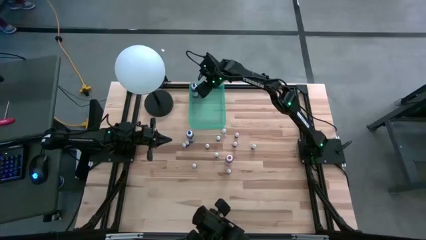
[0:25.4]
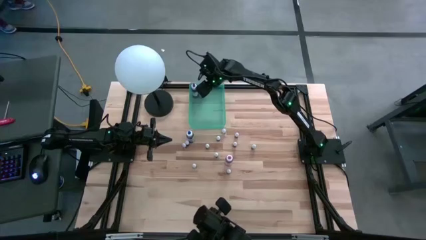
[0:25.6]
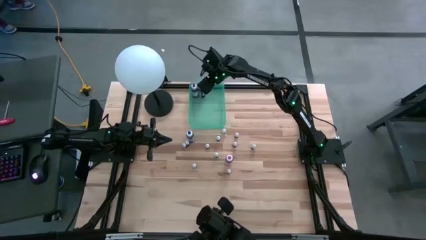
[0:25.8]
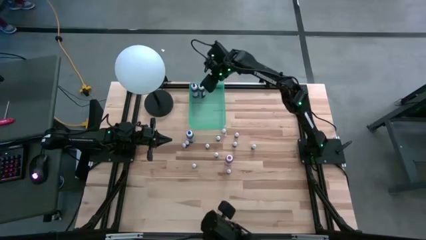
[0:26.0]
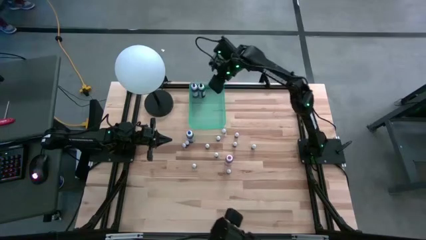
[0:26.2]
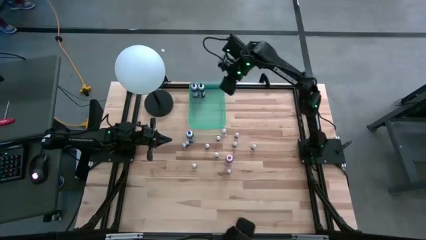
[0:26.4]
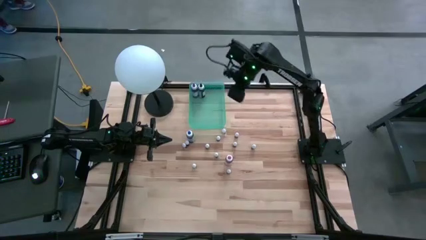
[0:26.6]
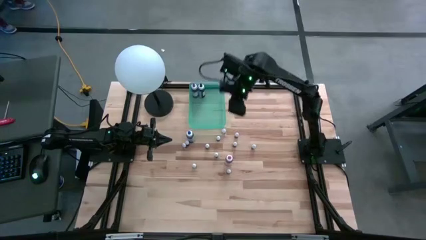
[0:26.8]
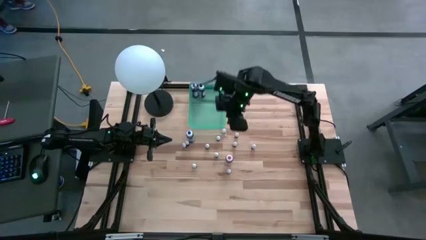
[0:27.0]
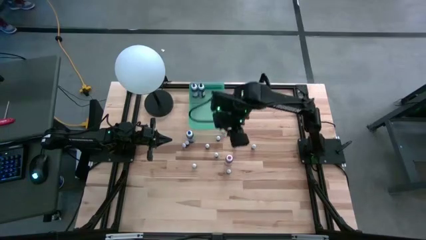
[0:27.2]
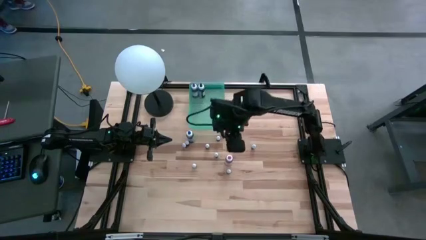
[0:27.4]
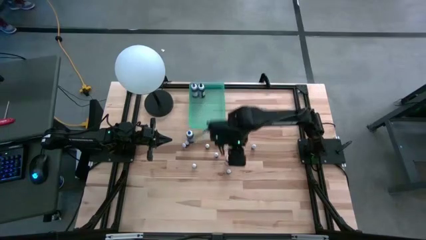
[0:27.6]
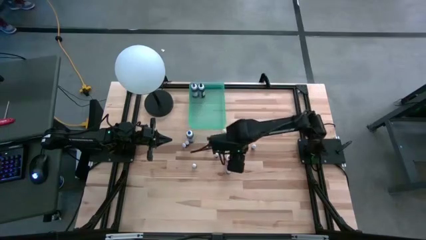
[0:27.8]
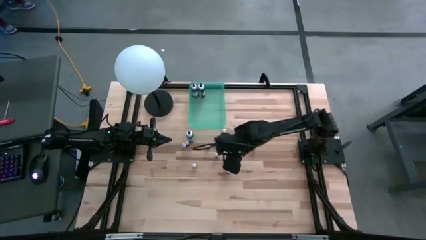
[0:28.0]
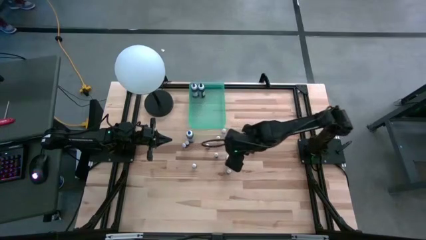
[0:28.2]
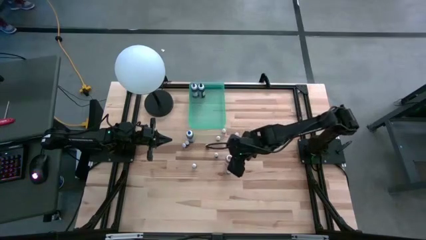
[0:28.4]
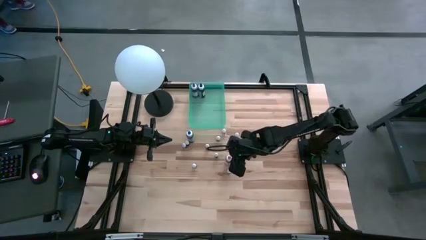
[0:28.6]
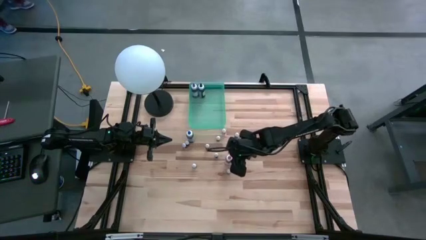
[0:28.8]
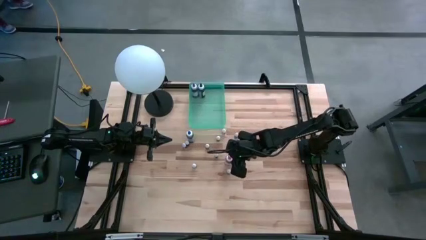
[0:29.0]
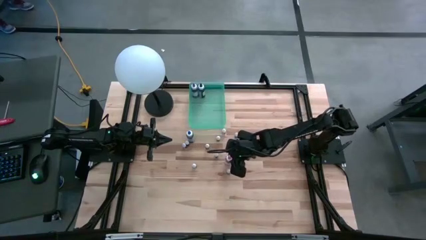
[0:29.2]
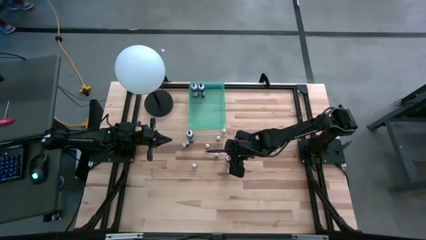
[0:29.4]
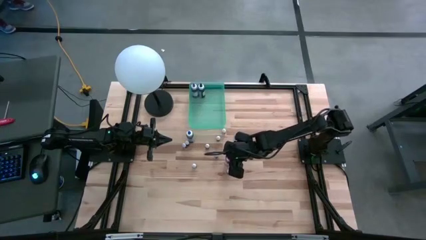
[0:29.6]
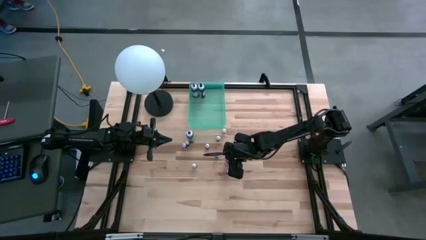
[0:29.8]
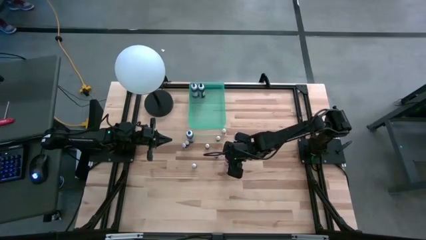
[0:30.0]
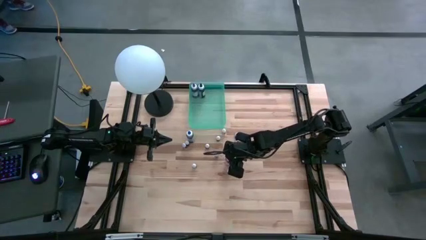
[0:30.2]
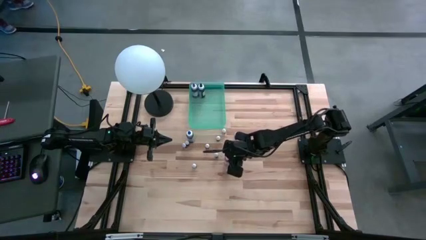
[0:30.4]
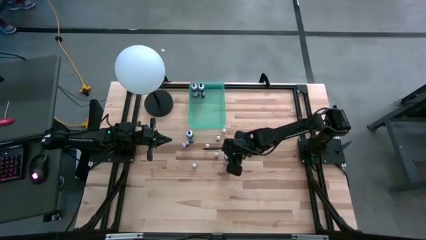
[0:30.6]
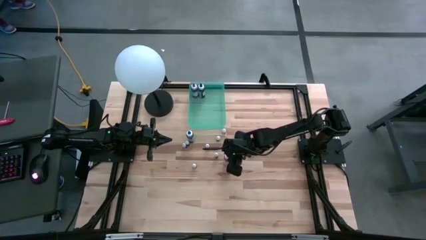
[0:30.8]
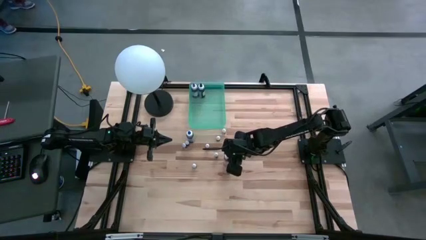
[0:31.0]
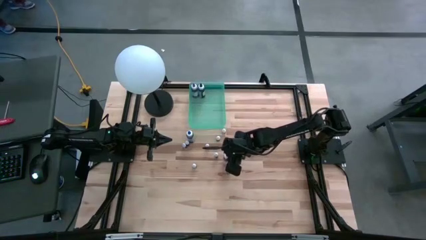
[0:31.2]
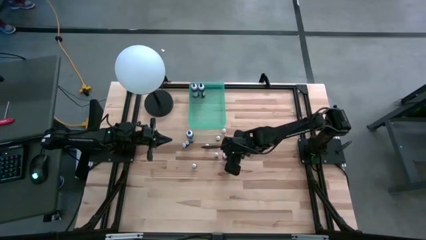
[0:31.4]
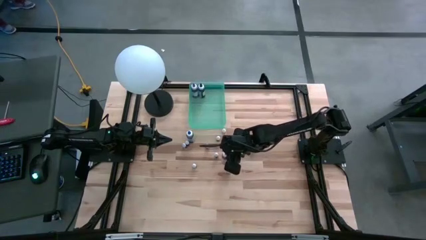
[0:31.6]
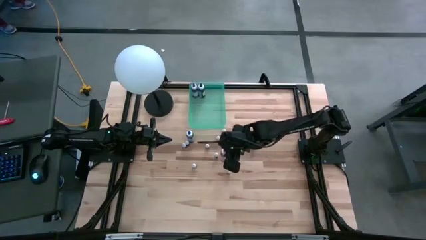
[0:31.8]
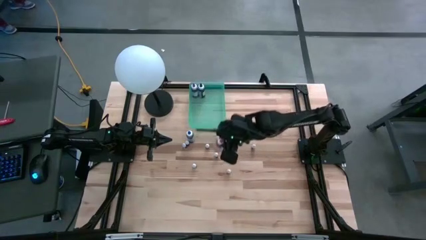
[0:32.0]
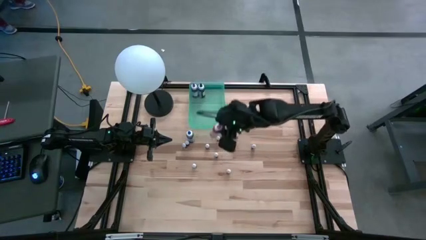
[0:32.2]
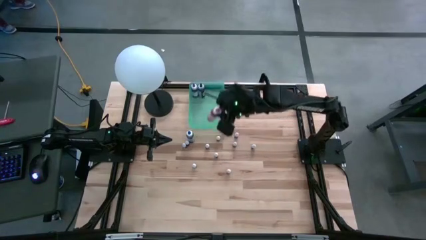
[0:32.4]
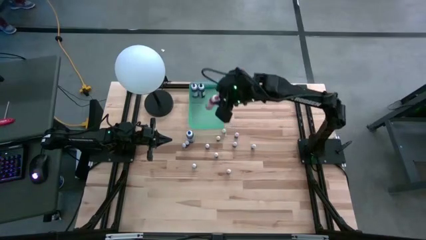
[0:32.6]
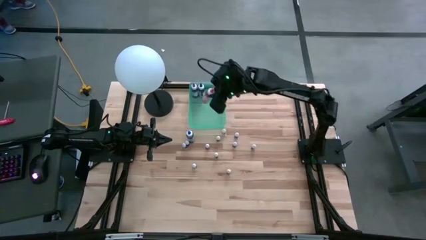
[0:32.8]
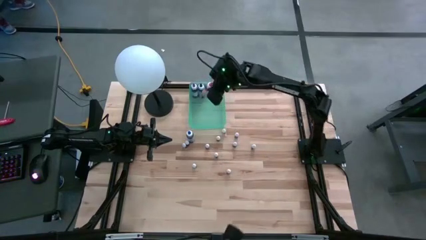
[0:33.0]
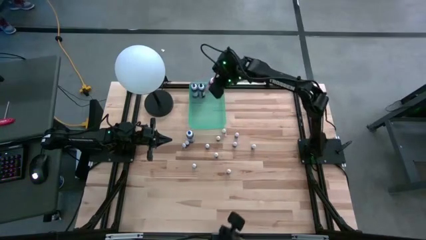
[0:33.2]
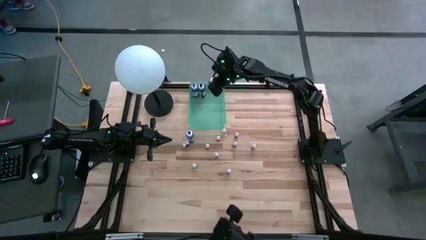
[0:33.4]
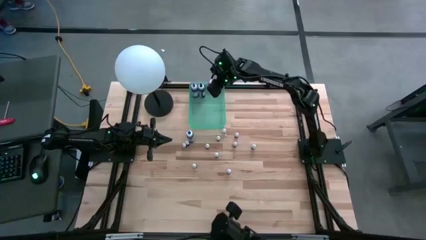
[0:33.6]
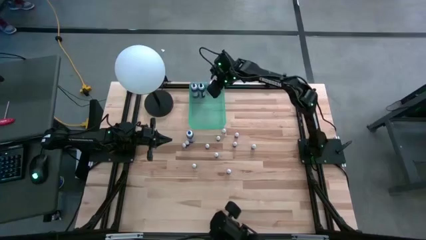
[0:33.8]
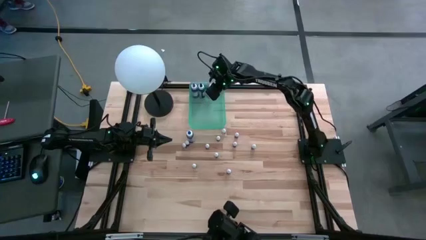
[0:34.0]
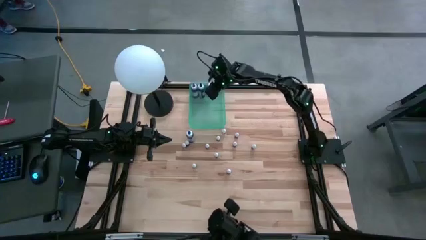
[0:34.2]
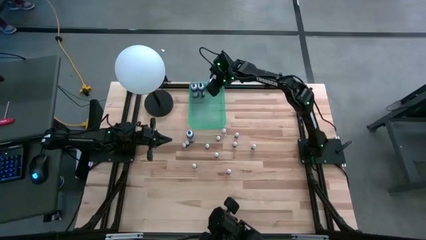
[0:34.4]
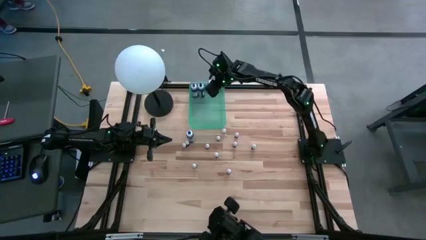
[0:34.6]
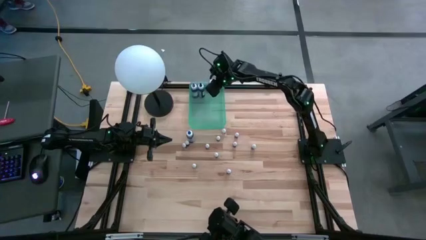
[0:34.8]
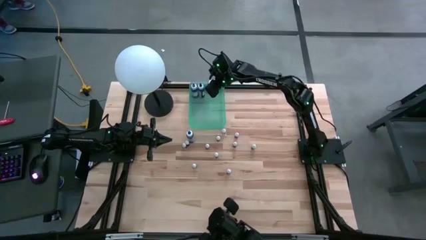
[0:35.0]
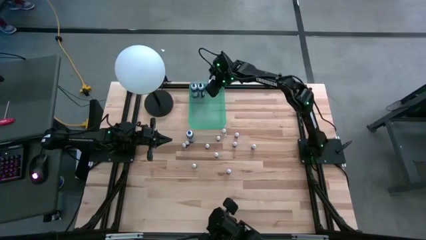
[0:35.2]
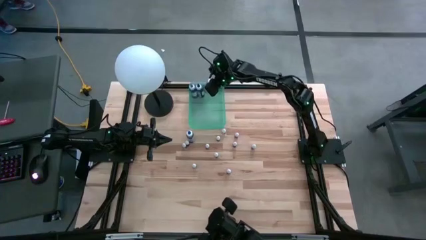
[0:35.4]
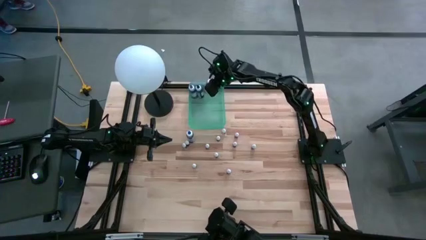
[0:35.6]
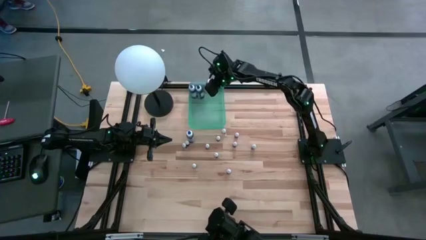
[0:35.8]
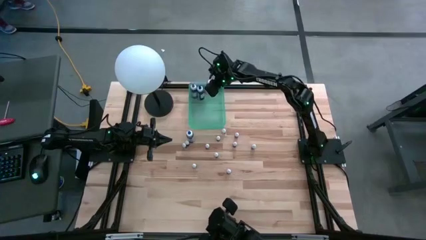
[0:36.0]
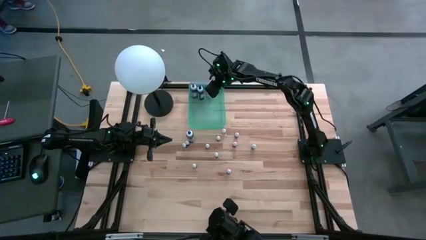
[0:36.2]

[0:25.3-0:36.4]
Task: Pick & Place food coloring
Put the large pink food coloring bottle into the blue bin

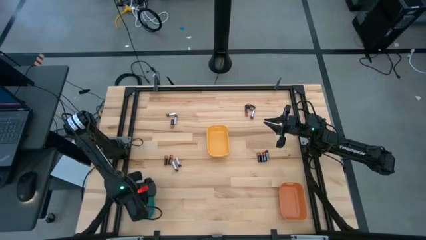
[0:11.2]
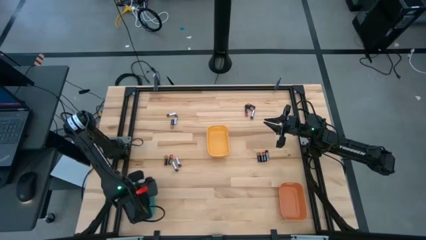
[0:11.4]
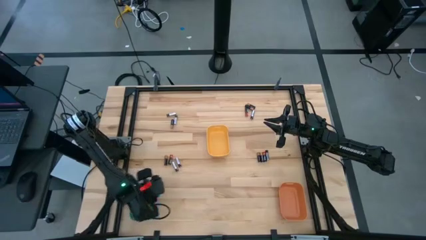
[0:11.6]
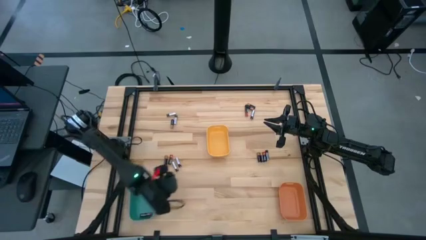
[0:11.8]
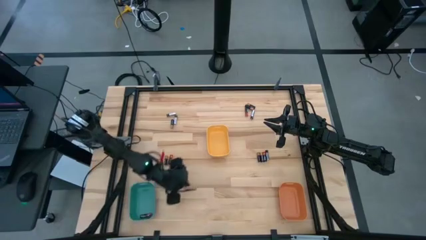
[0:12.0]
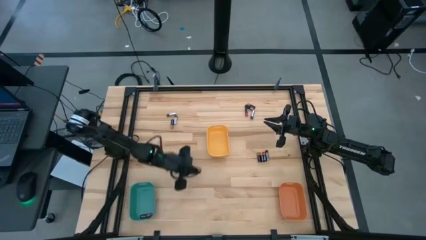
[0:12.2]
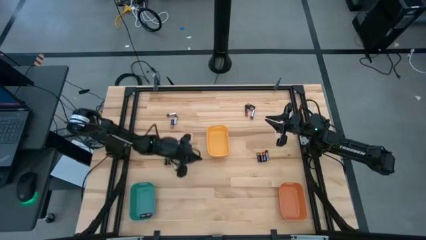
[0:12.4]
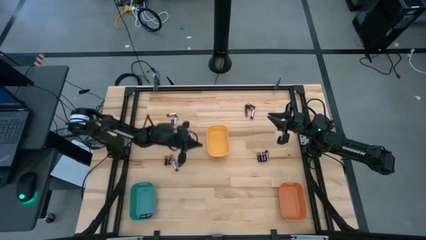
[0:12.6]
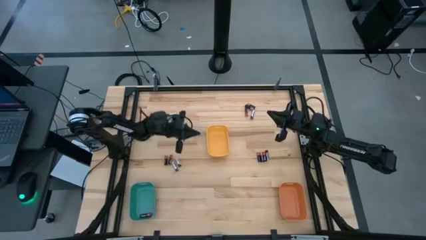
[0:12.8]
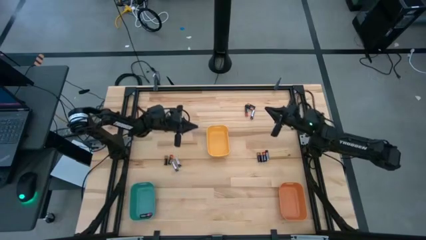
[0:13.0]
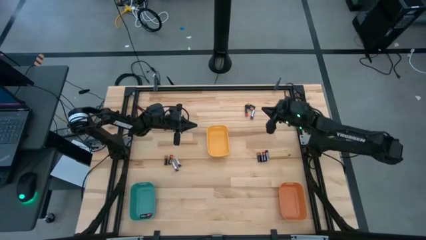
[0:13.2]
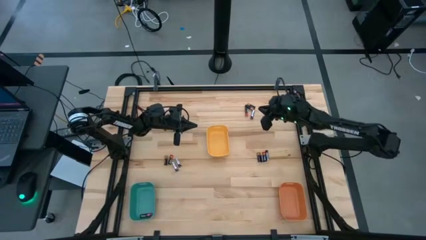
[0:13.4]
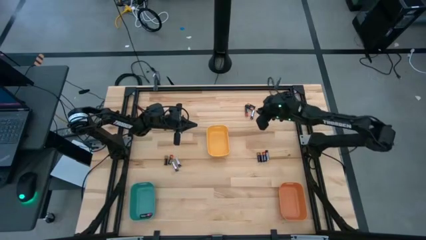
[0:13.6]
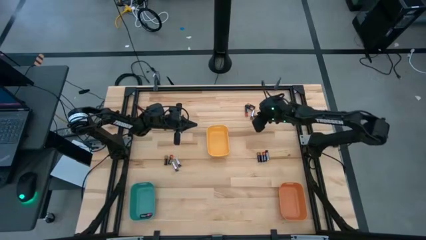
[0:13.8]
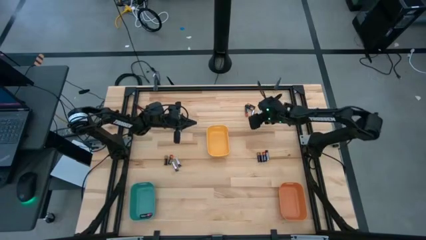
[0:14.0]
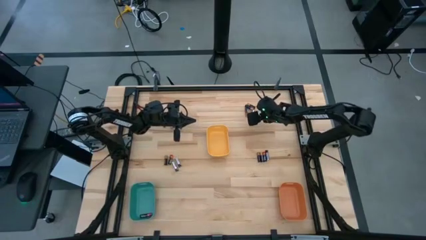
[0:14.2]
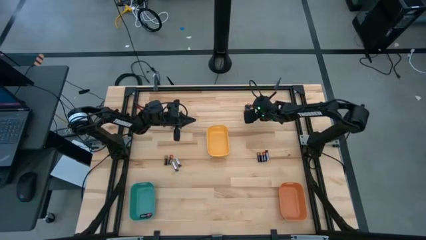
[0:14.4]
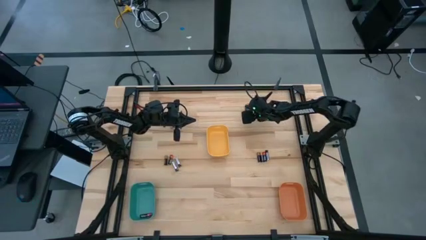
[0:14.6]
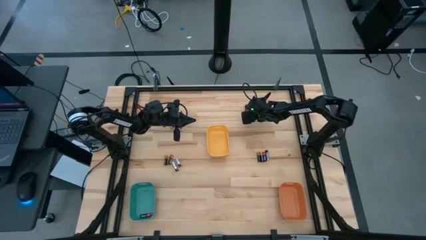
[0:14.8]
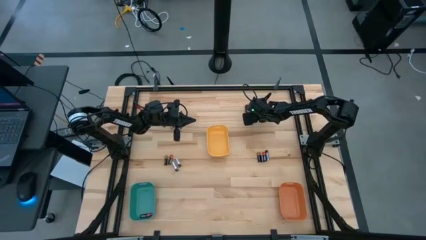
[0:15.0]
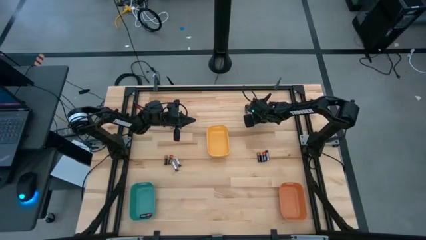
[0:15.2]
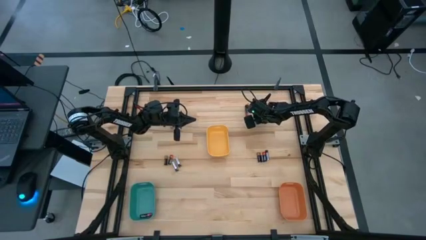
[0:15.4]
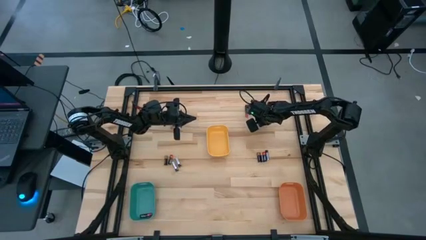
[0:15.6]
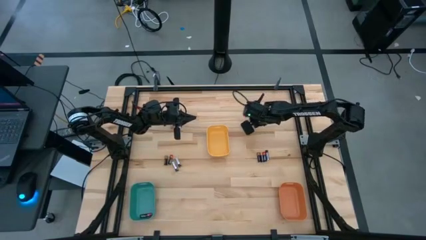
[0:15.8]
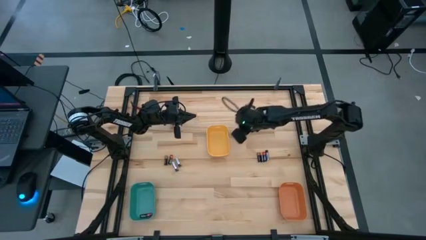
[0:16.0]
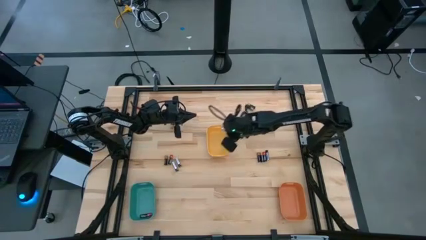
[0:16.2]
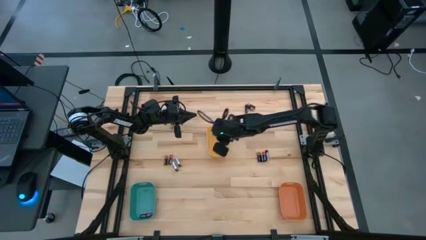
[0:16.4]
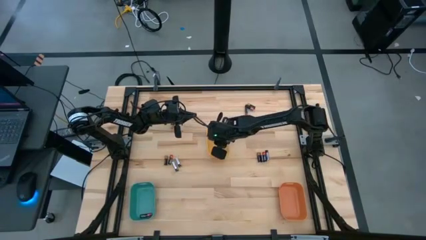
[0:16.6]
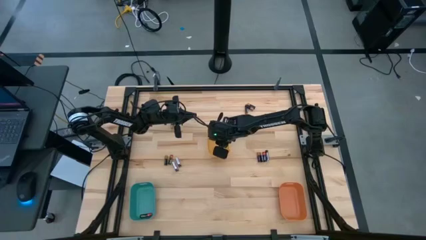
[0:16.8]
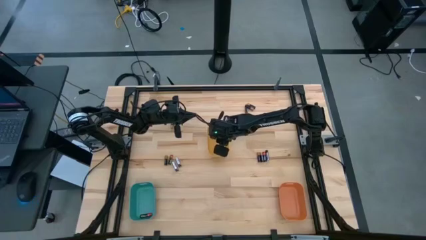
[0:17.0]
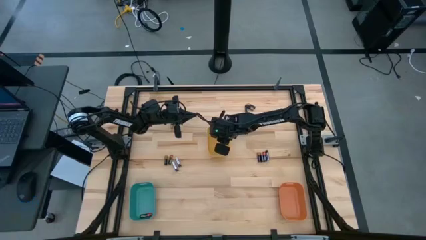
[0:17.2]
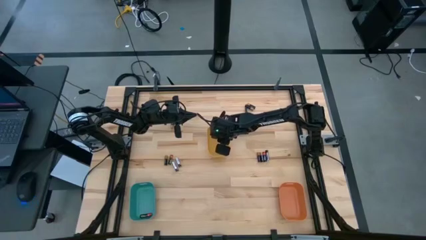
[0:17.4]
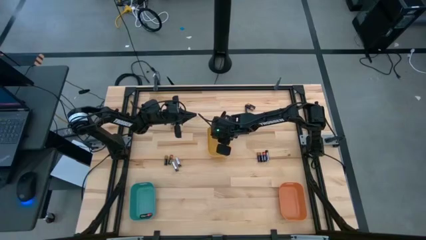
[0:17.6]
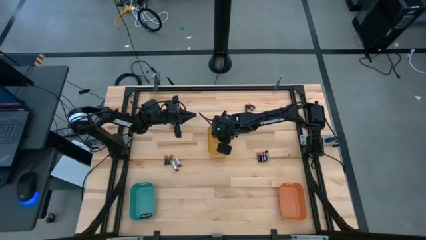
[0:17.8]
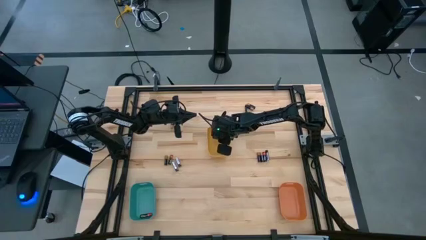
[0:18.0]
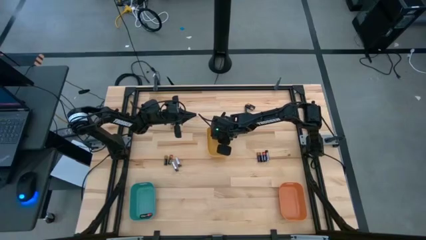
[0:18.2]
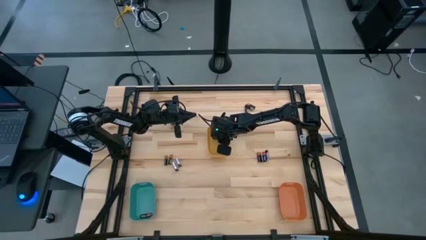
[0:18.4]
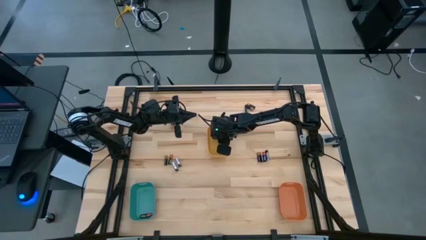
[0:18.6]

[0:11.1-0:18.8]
Task: Sort batteries
Put the silver battery into the yellow bin
